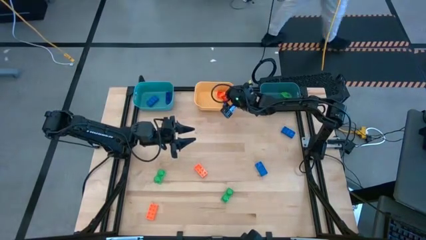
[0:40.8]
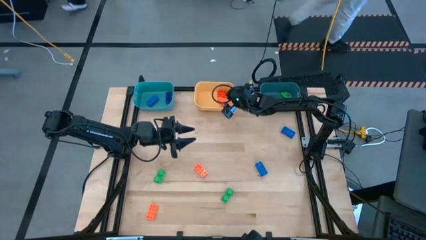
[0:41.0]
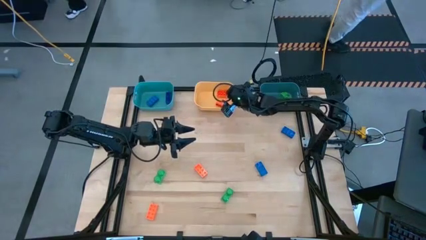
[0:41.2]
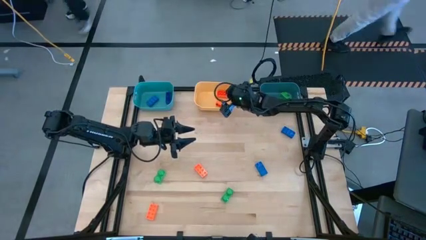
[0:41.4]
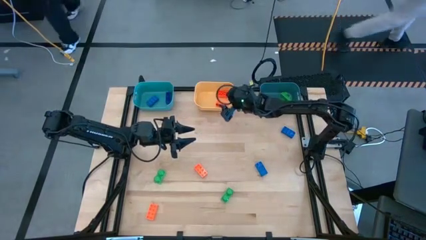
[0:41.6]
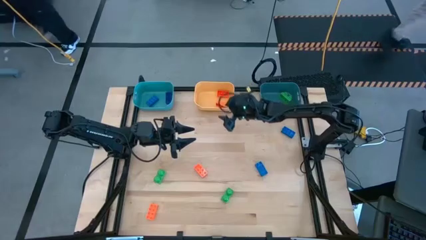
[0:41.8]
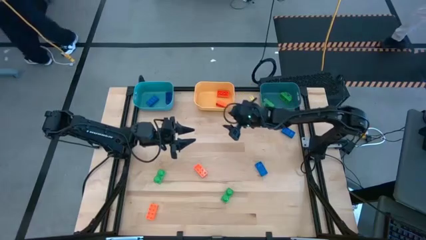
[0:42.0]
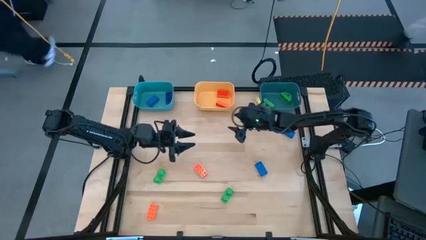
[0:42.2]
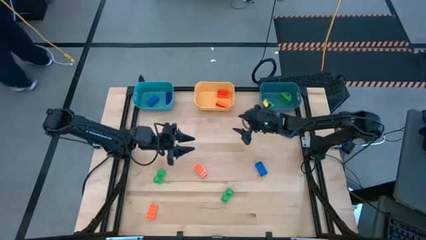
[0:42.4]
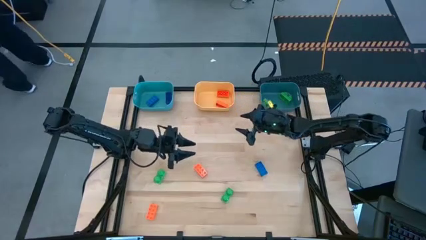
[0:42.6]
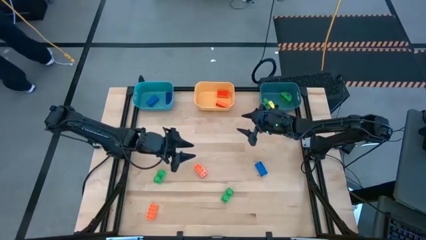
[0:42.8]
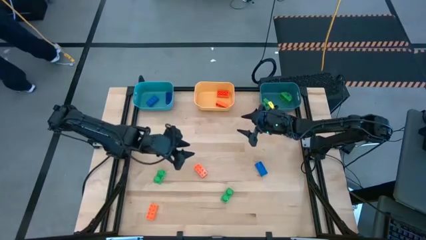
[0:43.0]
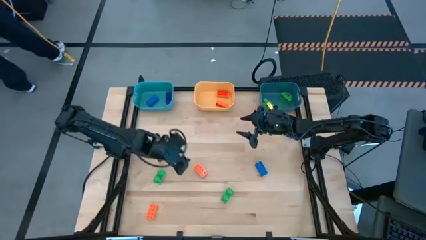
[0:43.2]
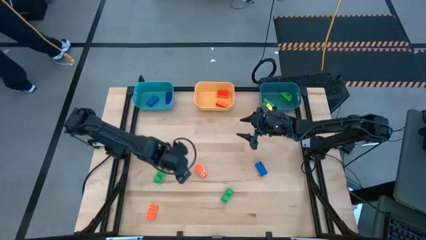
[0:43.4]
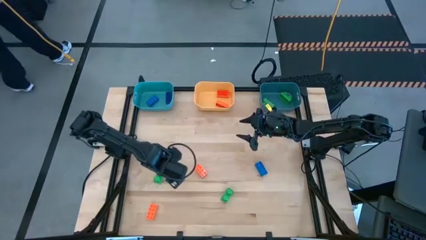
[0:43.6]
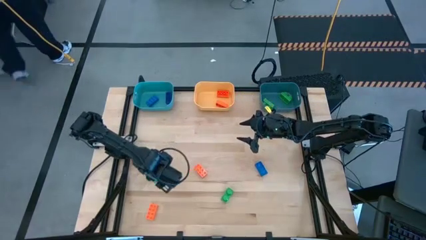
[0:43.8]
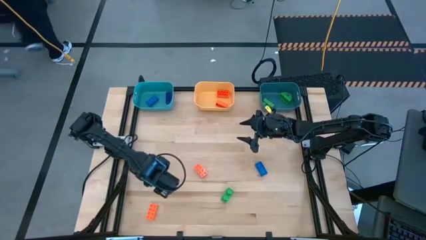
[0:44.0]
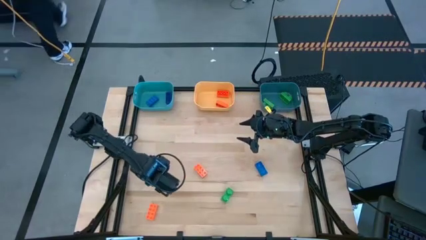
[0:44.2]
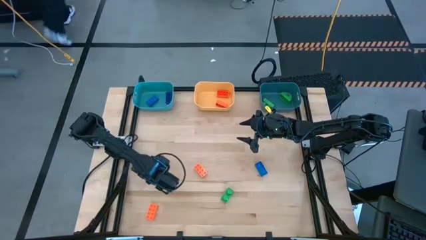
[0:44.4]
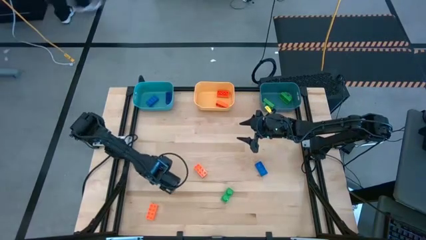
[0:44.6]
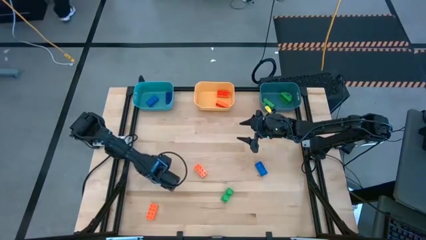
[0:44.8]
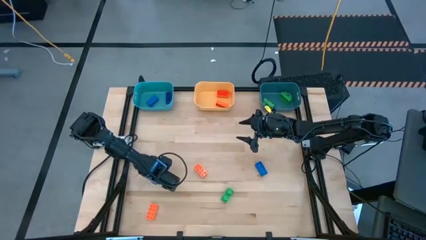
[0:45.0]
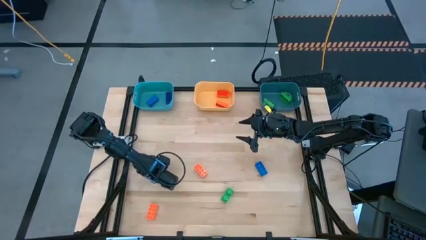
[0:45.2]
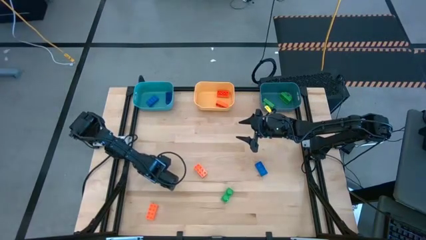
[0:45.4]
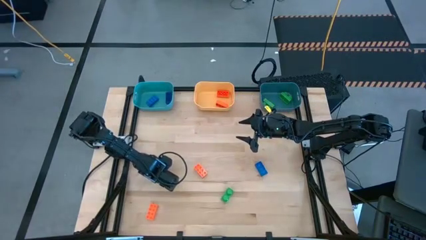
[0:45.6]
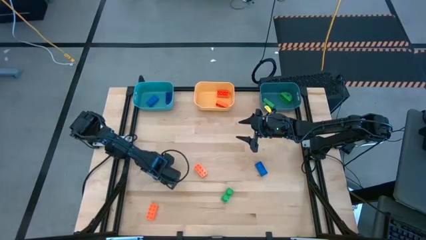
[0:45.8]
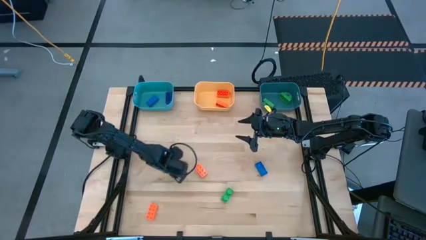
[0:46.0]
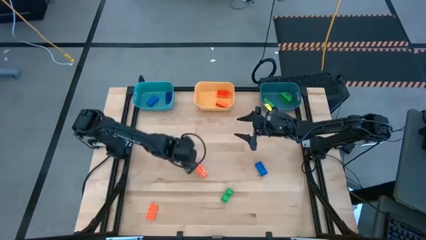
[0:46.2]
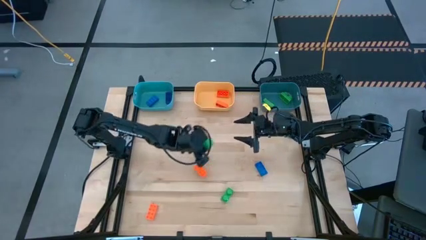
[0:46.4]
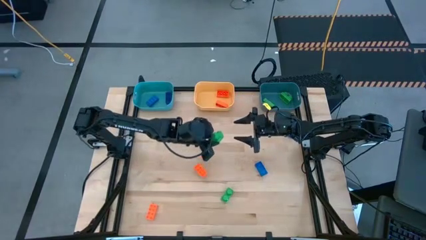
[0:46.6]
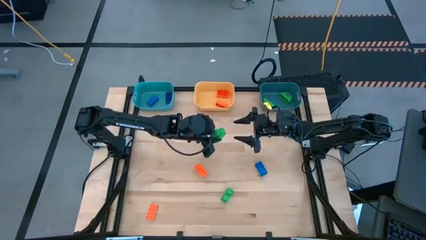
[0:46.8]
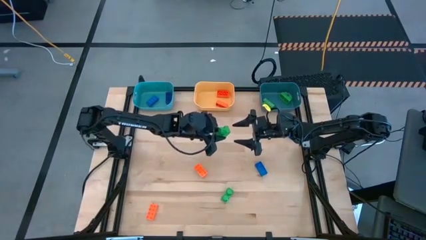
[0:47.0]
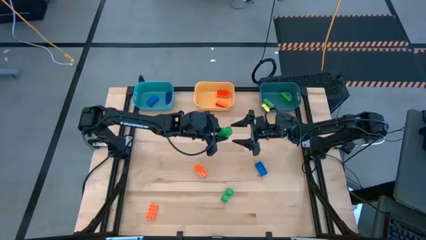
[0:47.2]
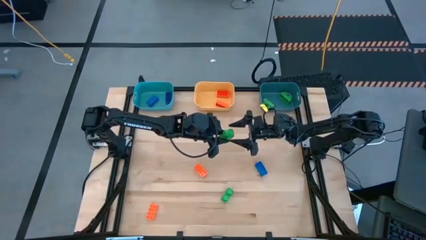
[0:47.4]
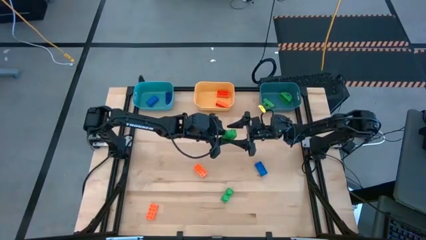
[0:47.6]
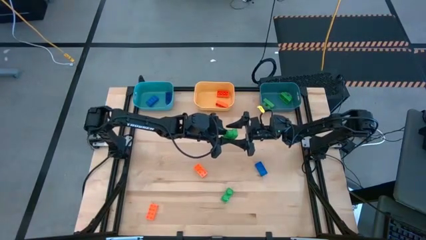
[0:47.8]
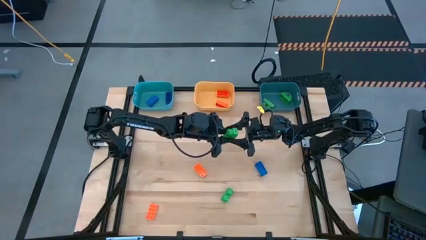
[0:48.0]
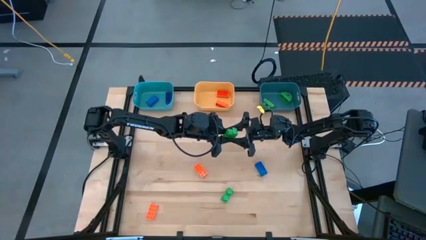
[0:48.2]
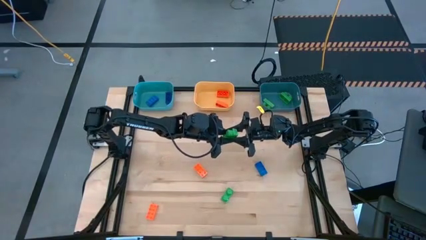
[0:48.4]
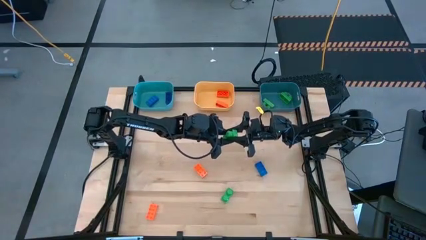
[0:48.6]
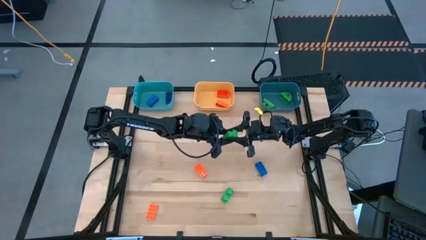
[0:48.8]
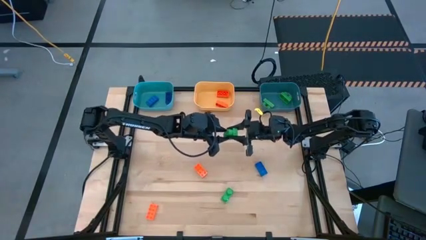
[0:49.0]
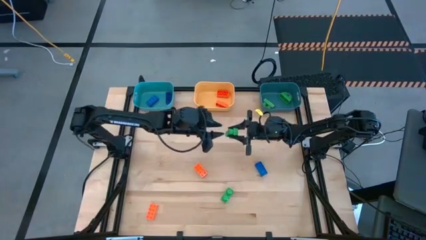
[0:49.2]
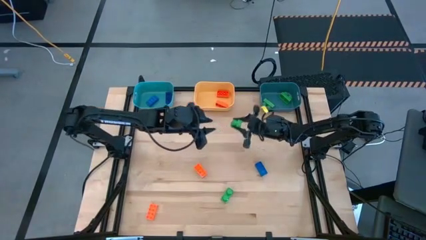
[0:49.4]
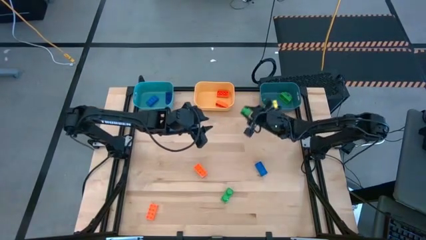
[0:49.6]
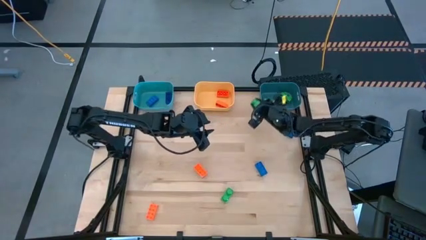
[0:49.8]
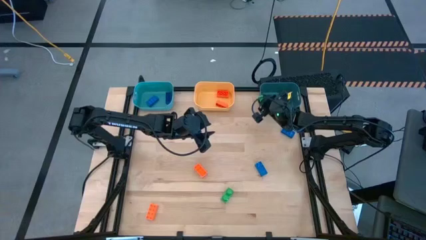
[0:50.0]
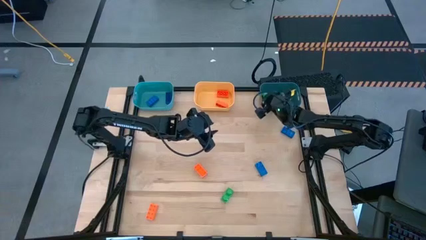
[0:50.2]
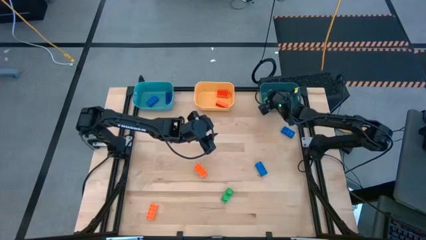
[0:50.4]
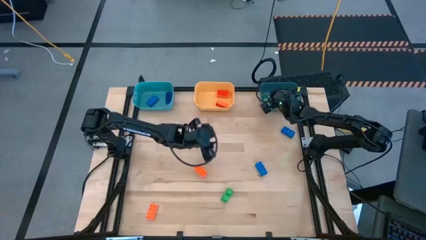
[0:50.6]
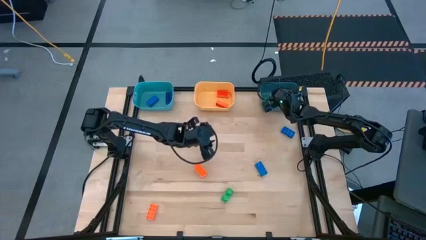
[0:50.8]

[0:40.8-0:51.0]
Task: Sort & place blocks by color
Put the green game piece into the dark blue bin
